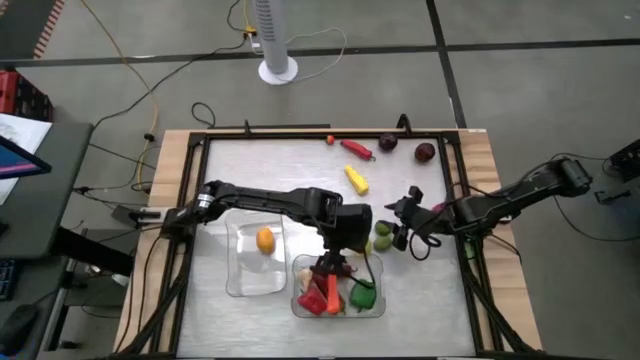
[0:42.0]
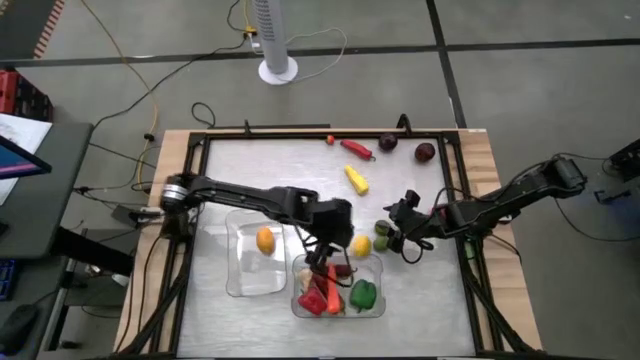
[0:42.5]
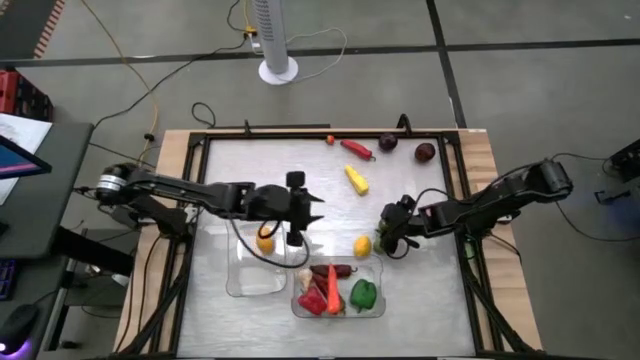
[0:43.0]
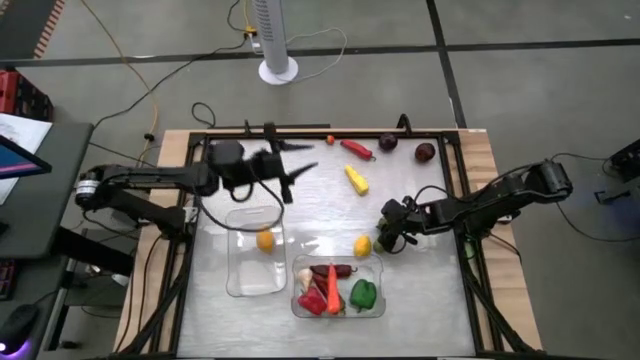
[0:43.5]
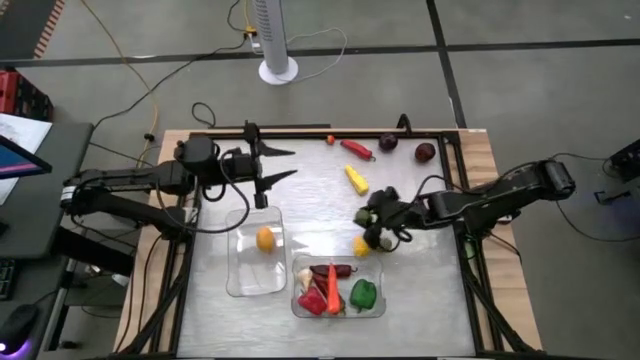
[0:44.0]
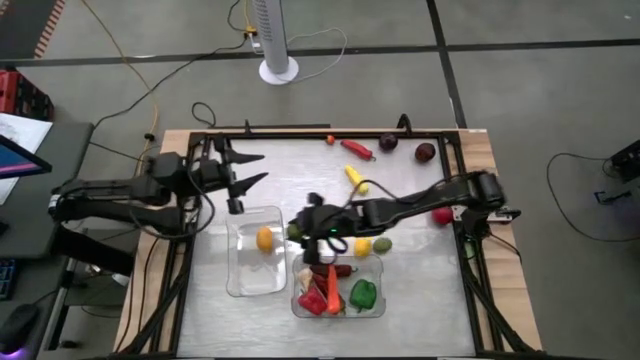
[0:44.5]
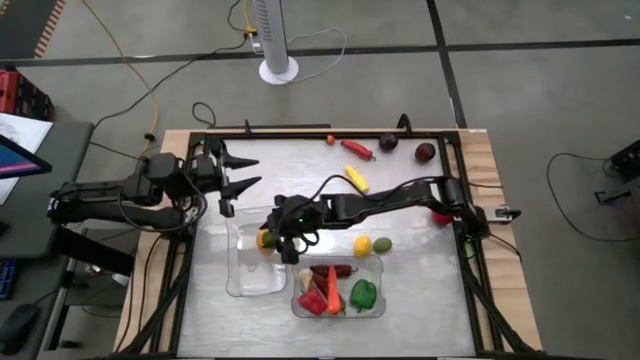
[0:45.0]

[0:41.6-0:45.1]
Task: Sort produce into baskets
Put the top green lime into the left transparent bin

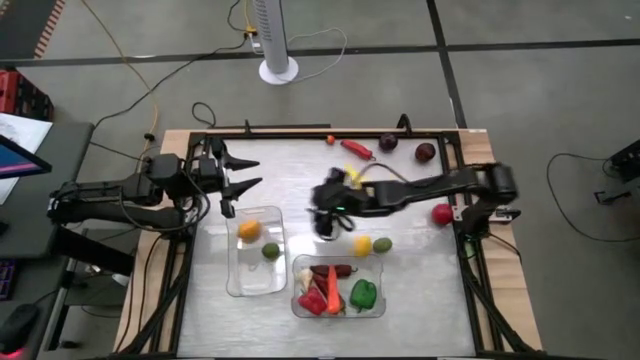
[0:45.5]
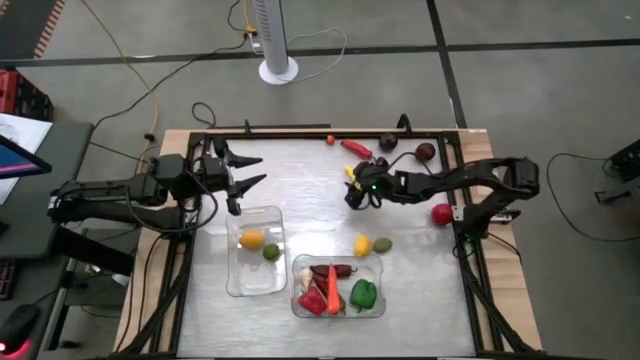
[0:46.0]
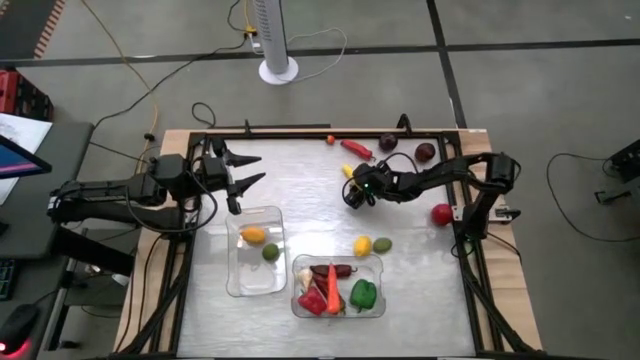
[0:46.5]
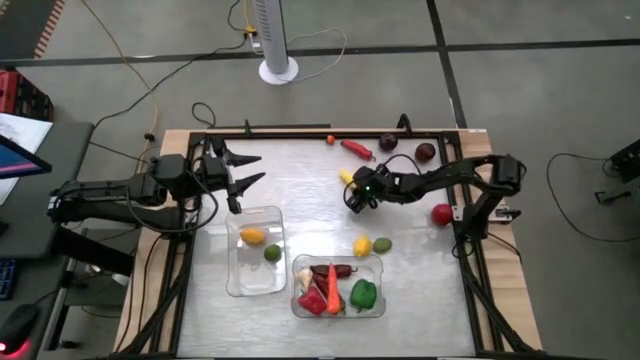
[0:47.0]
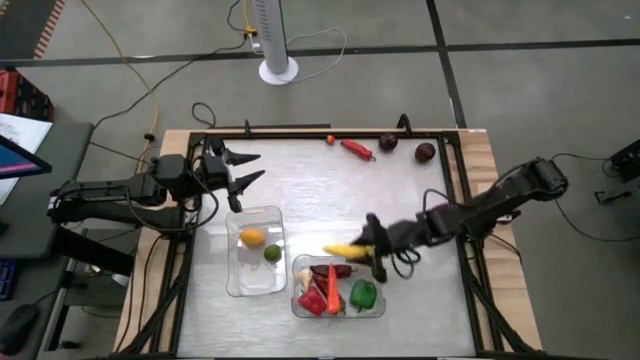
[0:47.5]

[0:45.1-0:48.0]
Put the yellow corn into right transparent bin

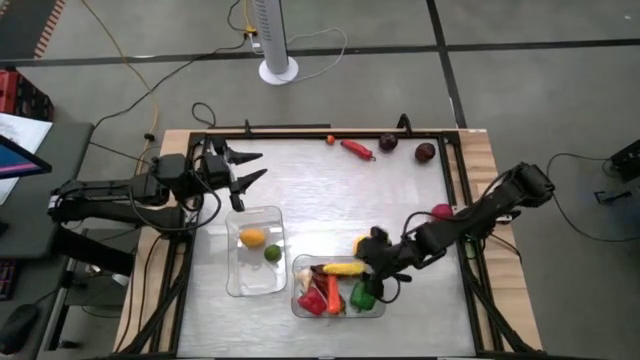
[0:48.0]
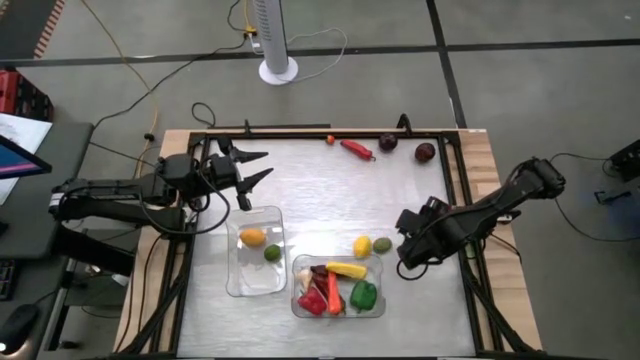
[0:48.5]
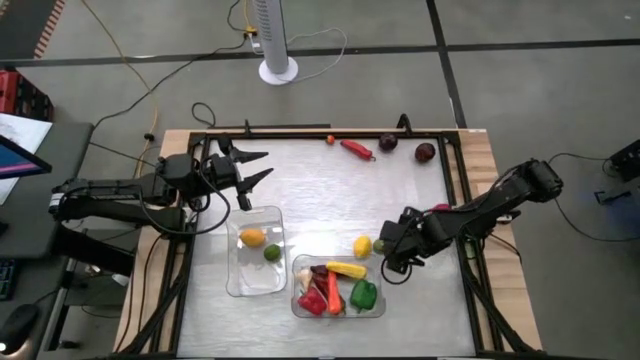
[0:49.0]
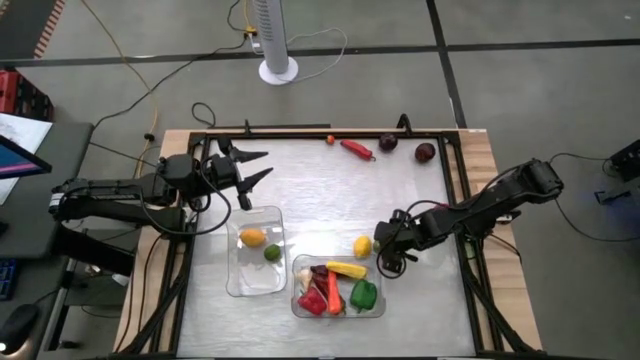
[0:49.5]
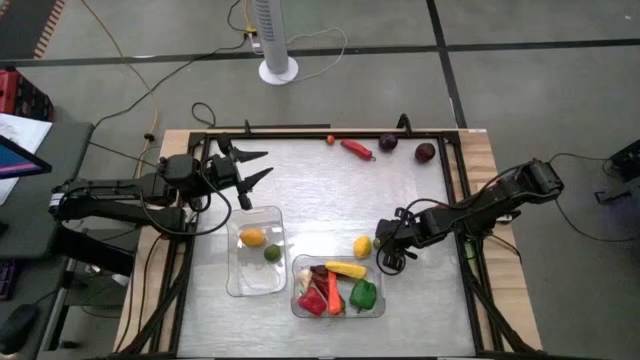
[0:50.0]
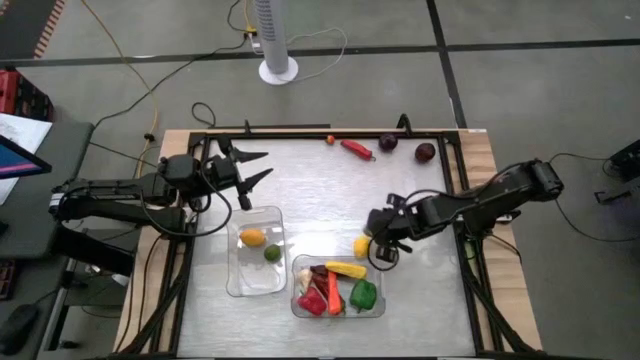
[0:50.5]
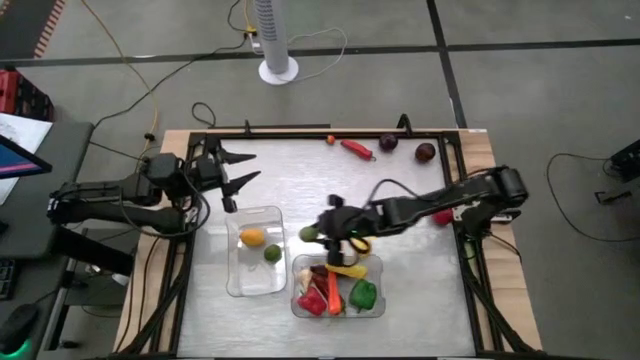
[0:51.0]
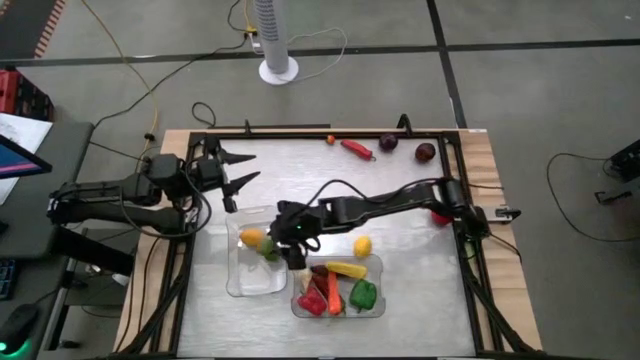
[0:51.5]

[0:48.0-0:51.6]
Put the green lime into the left transparent bin

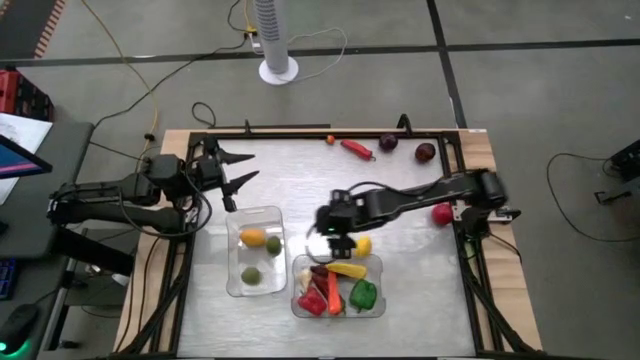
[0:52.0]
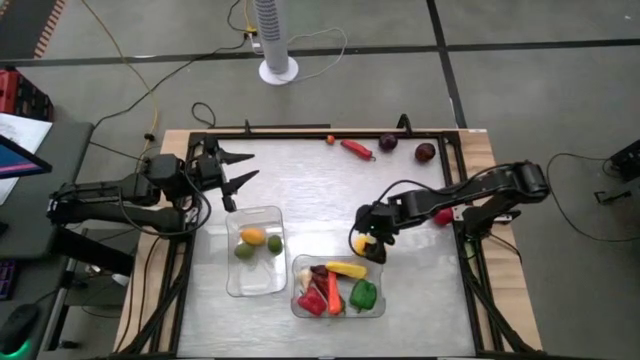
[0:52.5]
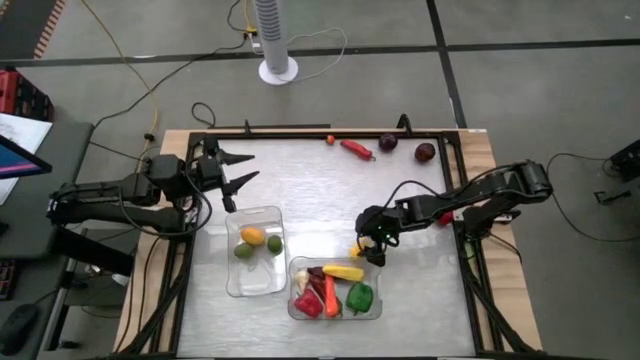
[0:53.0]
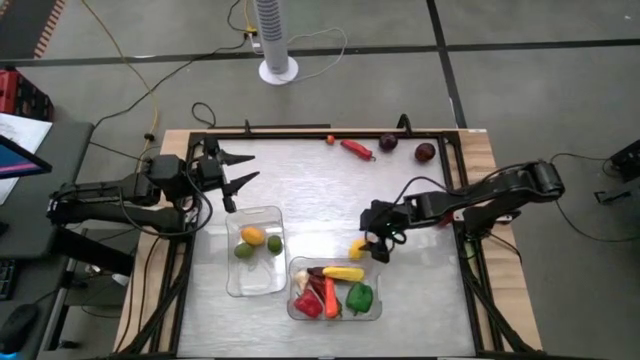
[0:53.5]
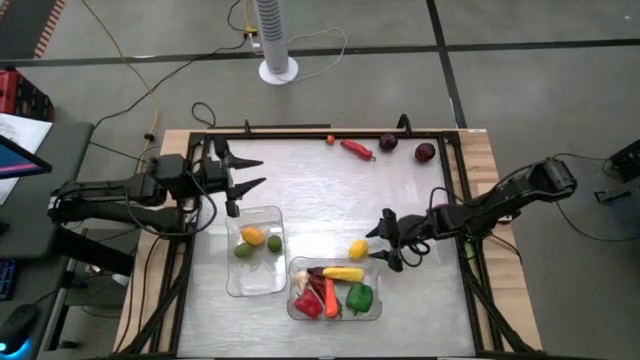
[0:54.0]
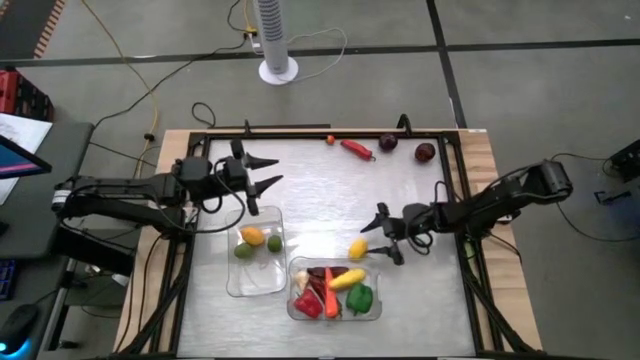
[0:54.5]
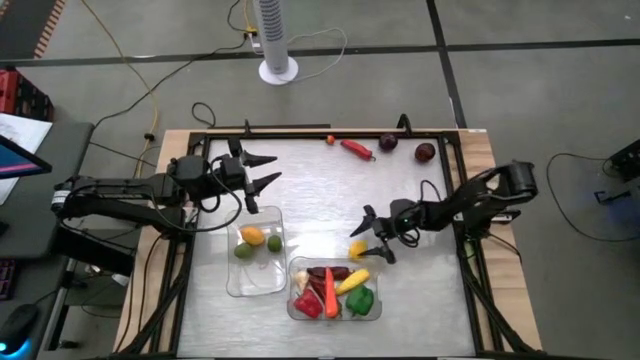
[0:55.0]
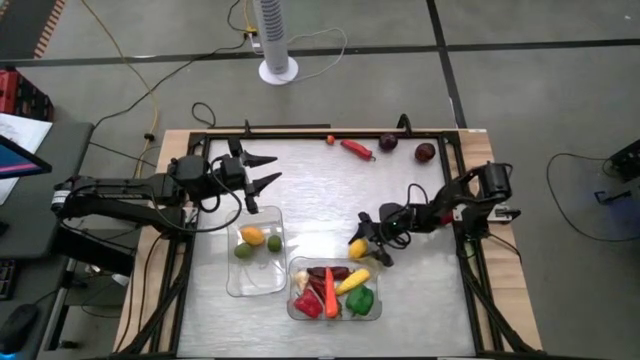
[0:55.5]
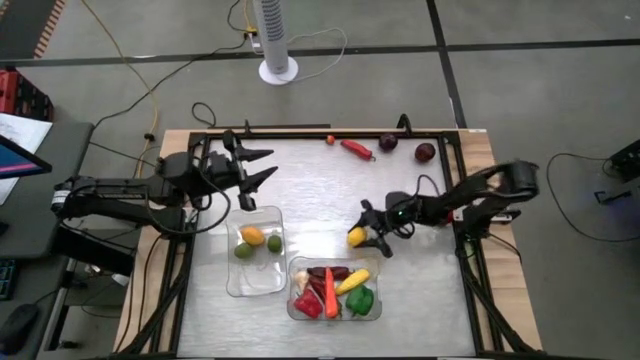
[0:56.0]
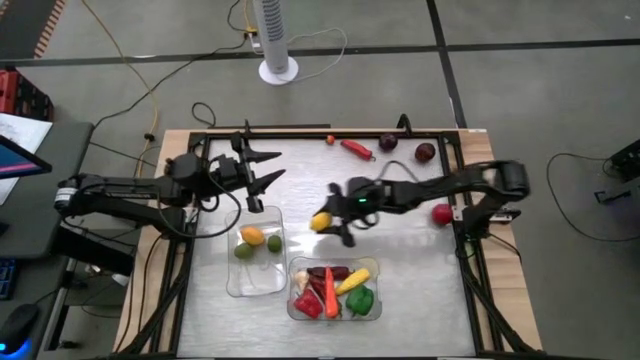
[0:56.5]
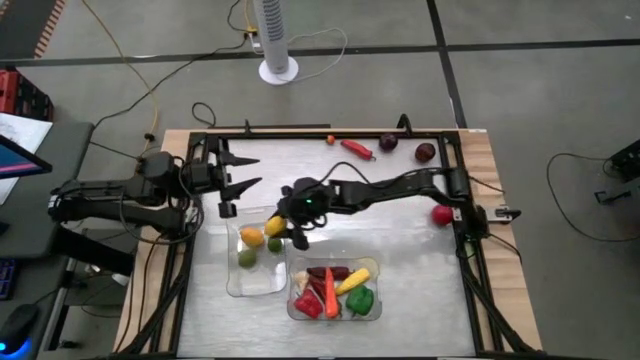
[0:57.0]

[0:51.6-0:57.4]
Put the yellow lemon into the left transparent bin

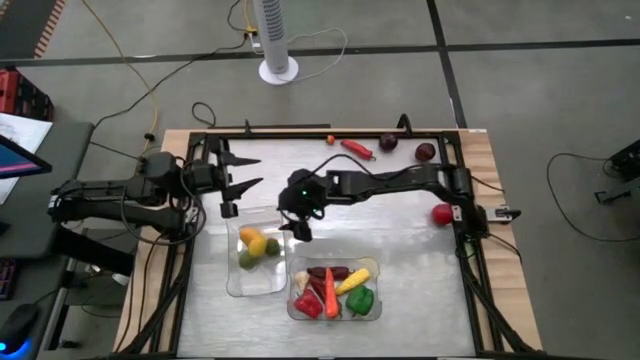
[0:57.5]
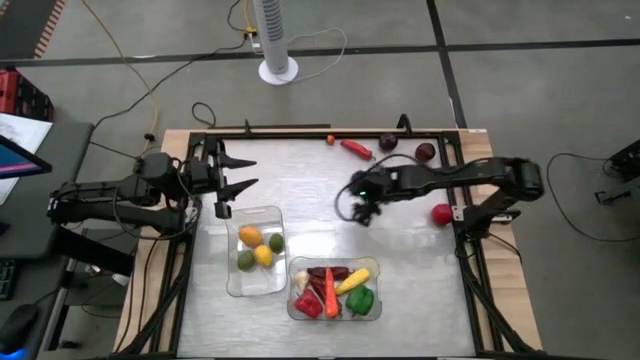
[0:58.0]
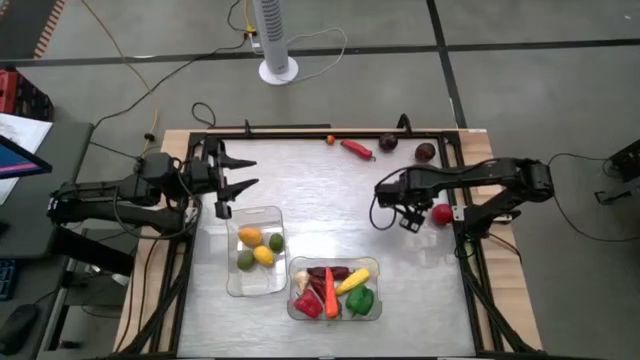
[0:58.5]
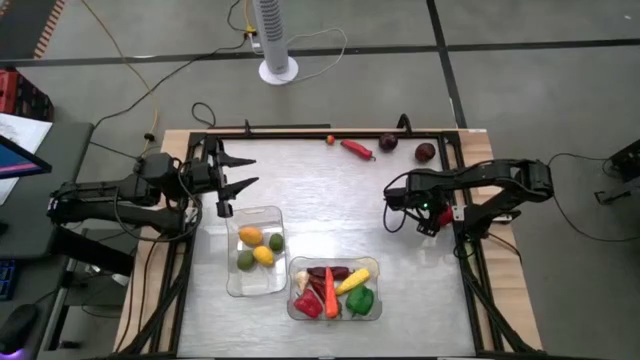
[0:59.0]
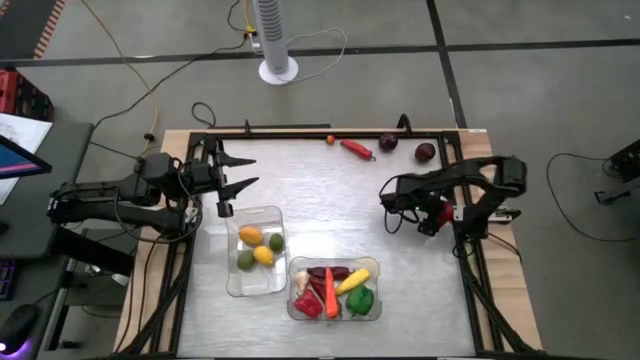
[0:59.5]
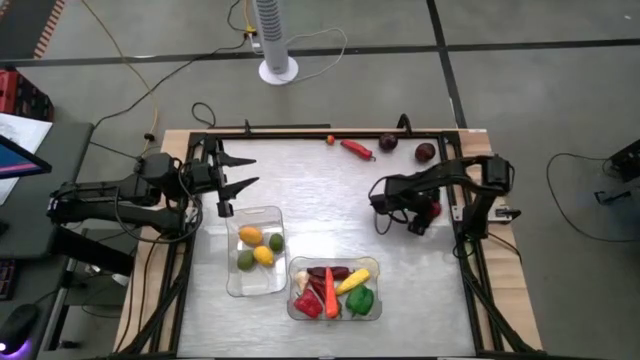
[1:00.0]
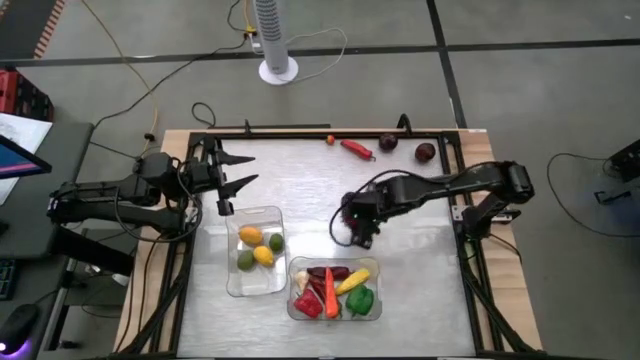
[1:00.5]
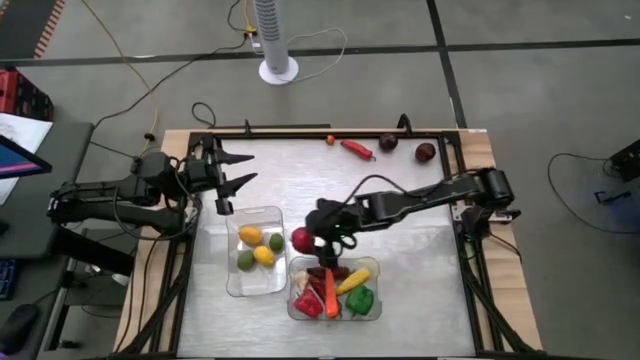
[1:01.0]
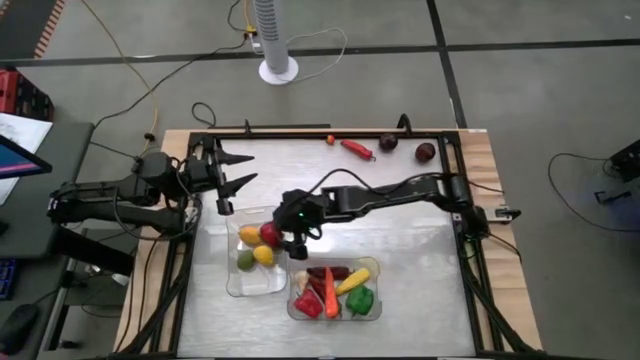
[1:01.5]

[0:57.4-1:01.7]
Put the red tomato into the left transparent bin

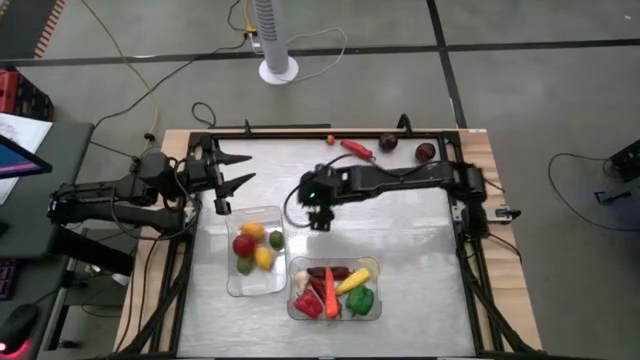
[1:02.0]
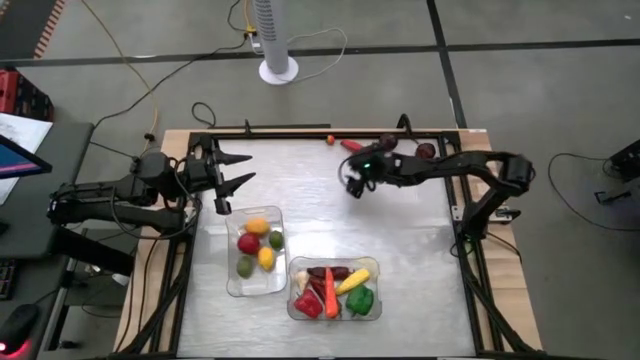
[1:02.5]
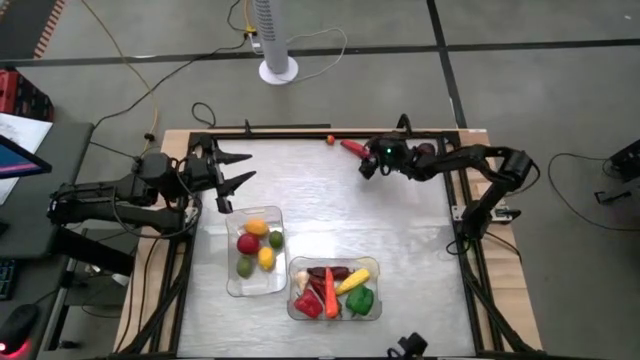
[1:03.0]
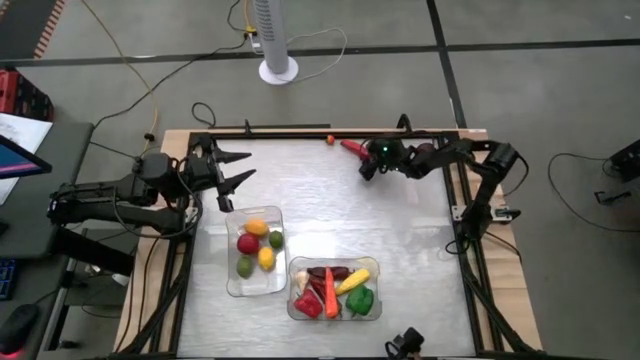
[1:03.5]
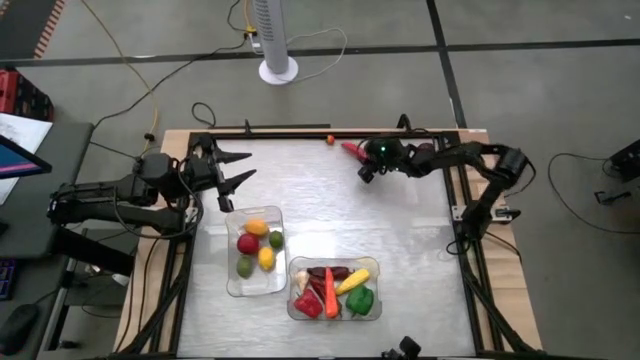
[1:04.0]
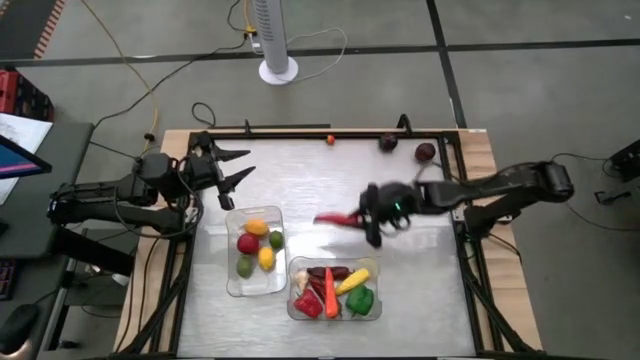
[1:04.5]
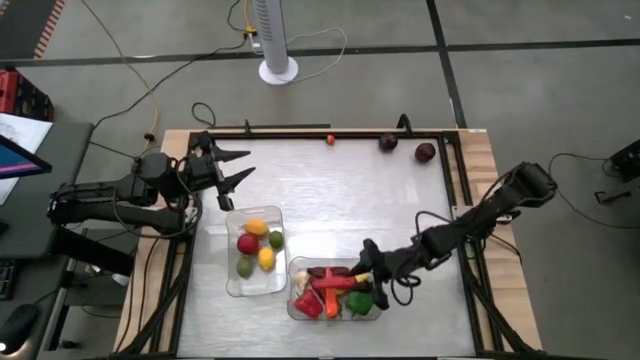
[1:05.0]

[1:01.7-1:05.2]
Put the red bell pepper into the right transparent bin
